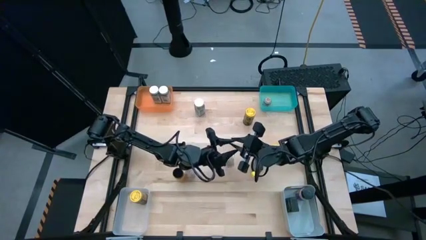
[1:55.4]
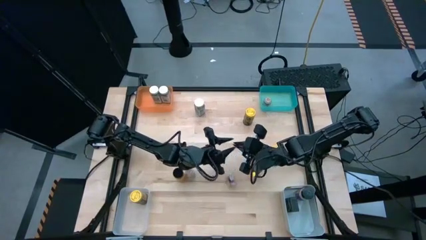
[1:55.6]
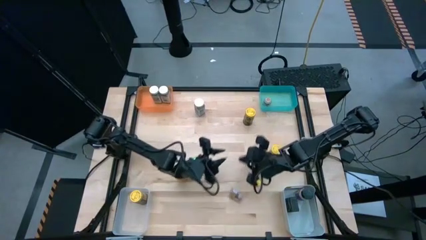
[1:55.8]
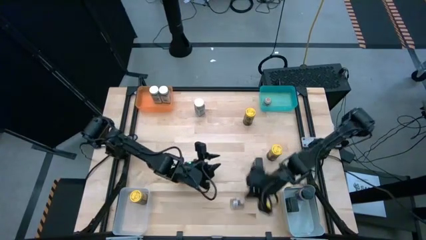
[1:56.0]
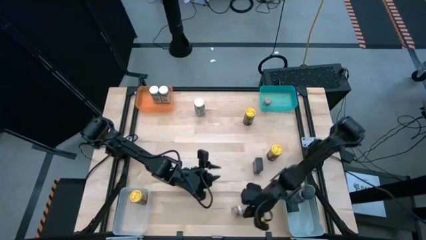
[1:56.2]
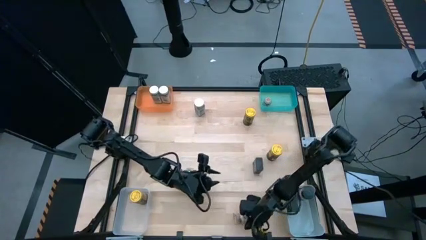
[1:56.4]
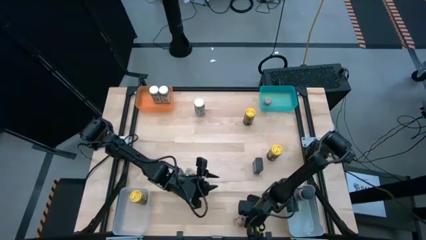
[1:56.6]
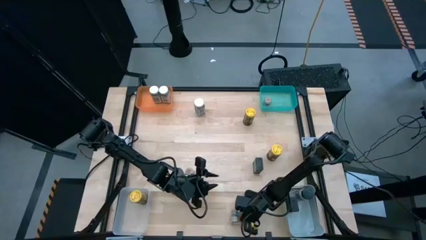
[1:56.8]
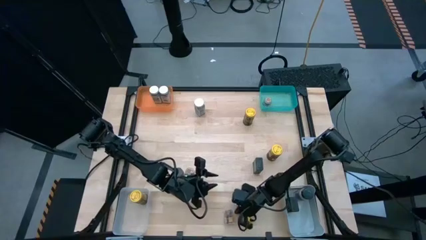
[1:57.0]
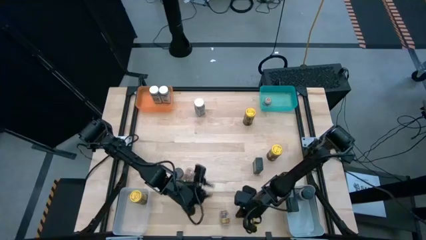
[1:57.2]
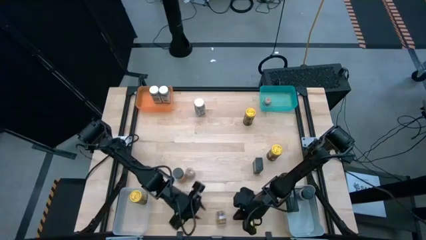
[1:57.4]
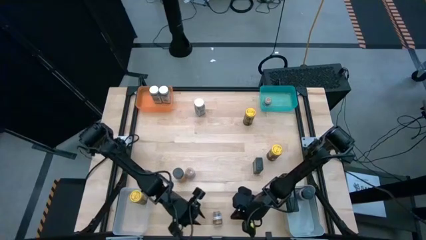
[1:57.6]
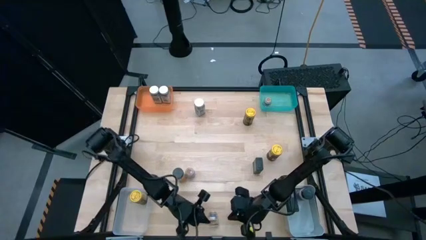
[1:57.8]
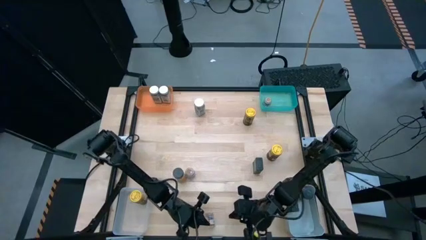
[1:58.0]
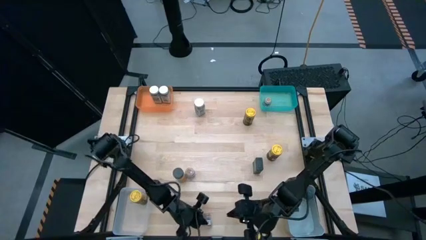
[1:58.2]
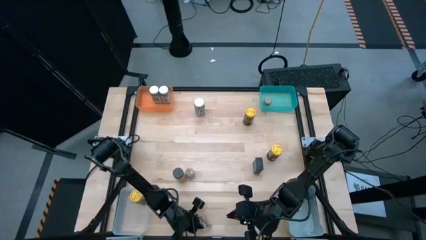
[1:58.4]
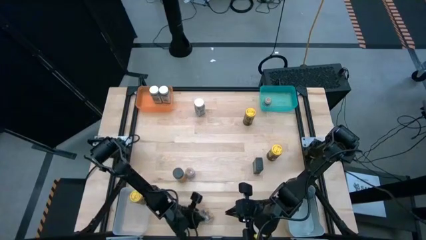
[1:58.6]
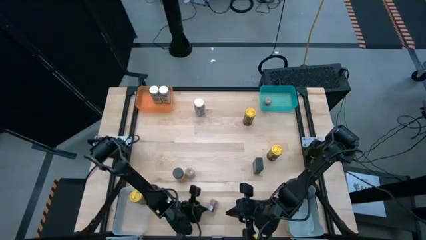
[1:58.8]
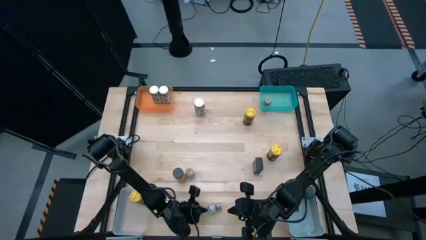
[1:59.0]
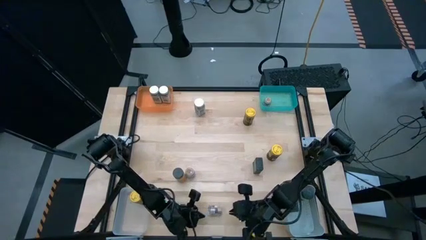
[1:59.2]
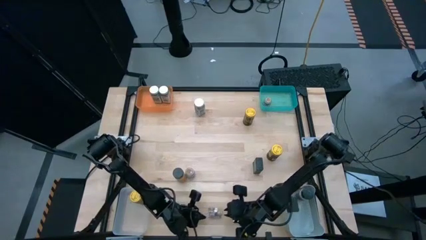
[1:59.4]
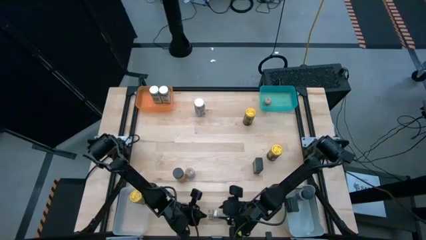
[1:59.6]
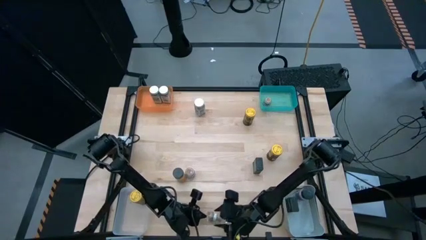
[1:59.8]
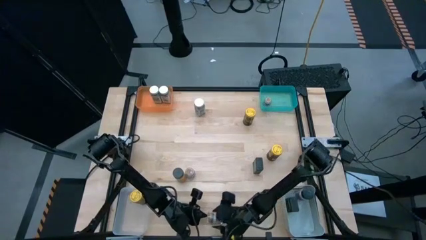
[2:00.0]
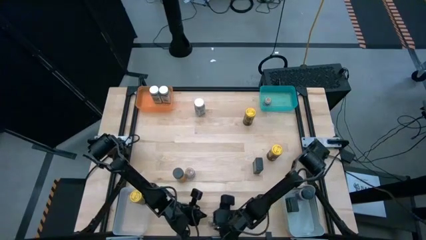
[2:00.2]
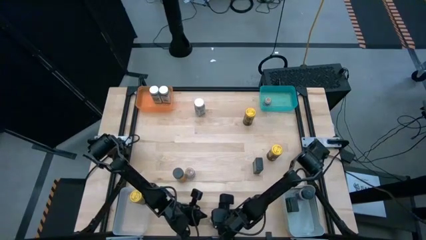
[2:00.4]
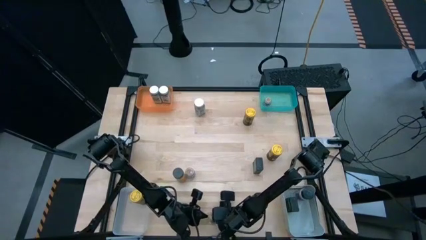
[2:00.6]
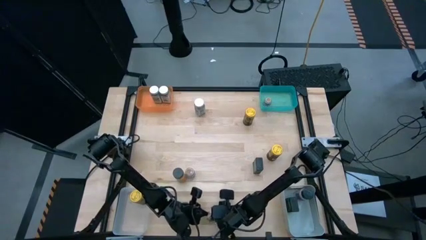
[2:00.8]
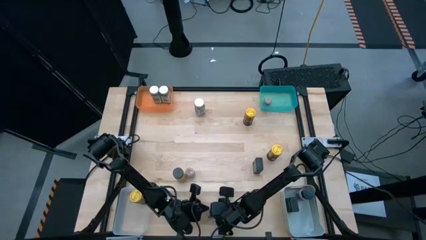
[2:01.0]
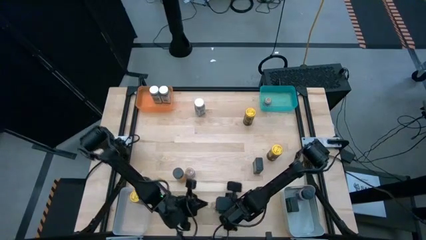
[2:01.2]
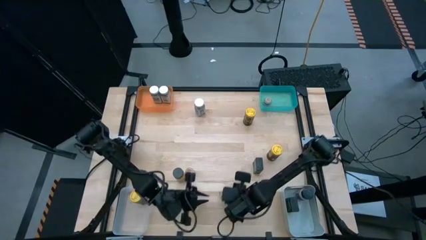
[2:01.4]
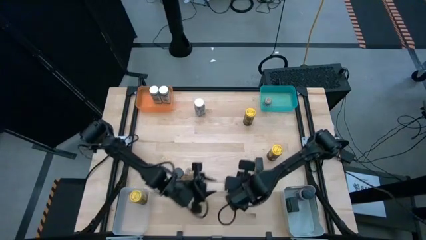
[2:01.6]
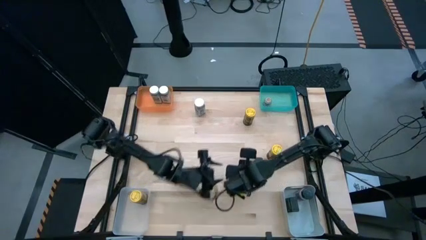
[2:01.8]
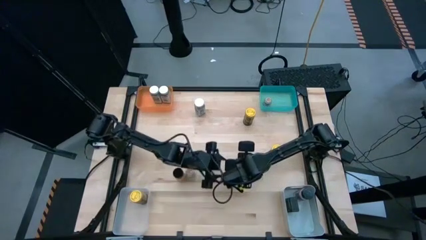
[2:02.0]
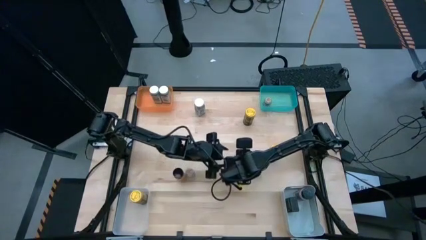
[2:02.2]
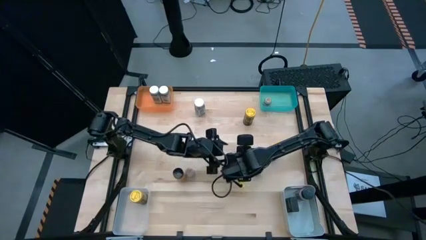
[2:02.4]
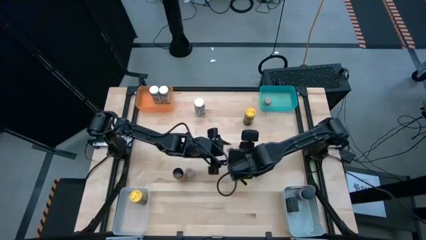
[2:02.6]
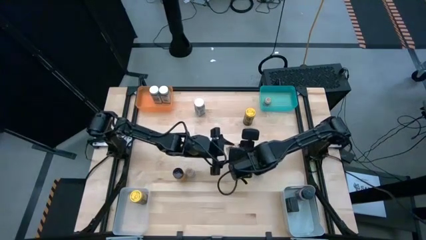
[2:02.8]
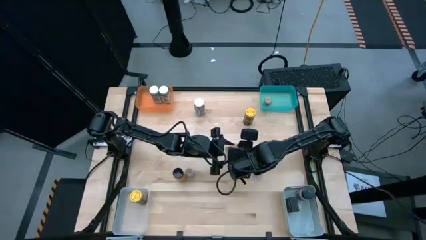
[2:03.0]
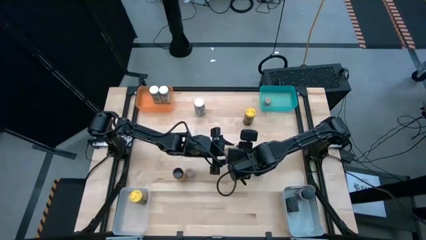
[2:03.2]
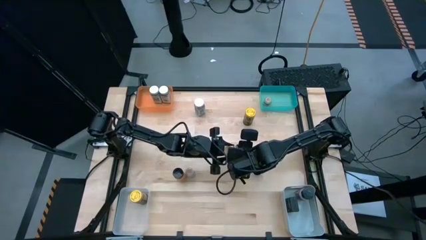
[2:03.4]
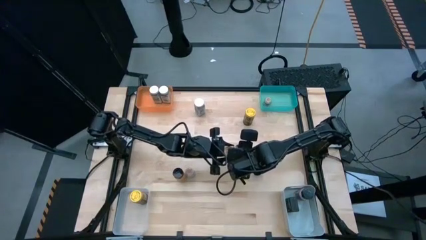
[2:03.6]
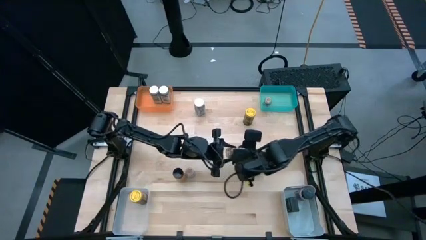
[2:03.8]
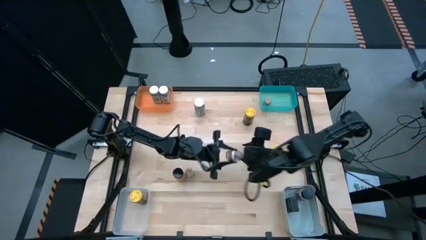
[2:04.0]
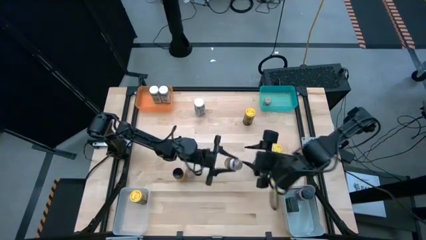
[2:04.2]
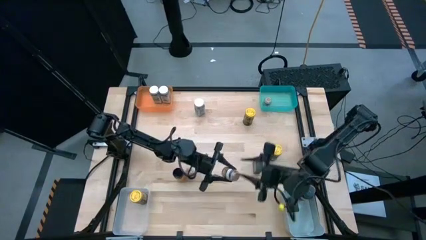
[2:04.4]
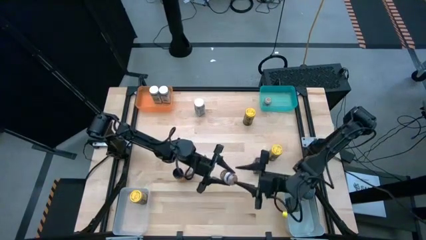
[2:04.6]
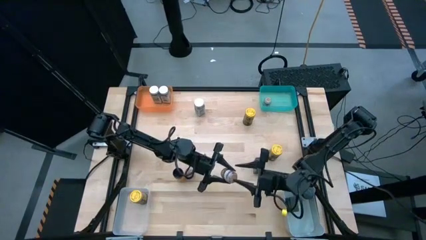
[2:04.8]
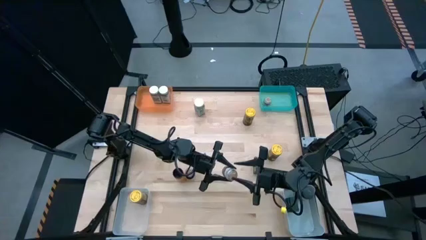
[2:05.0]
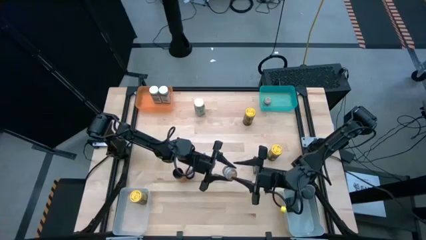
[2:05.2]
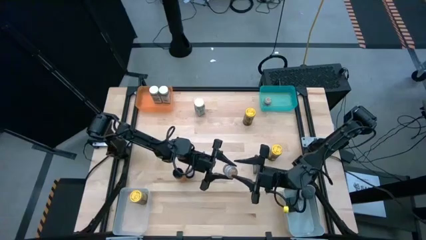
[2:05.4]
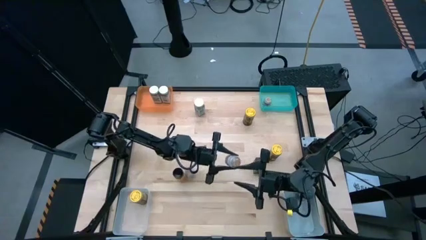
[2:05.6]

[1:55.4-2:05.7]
Task: Sort spices by type
Put the brown seasoning bottle into the blue bin

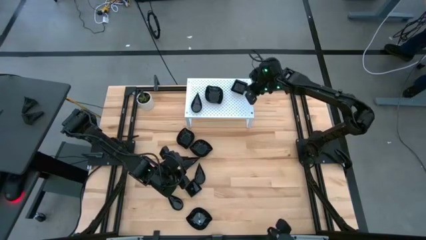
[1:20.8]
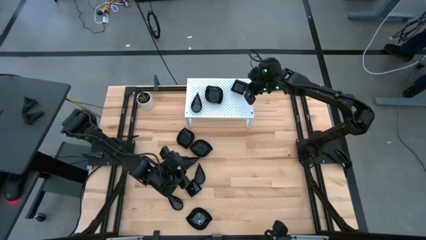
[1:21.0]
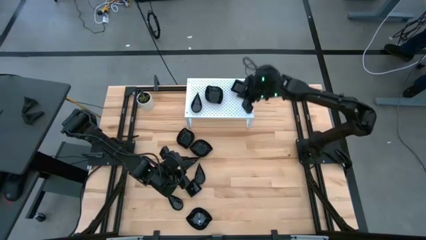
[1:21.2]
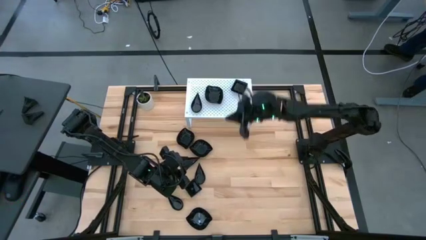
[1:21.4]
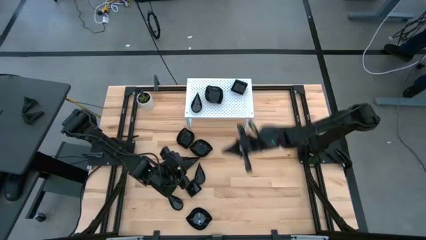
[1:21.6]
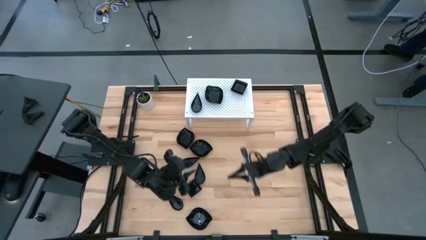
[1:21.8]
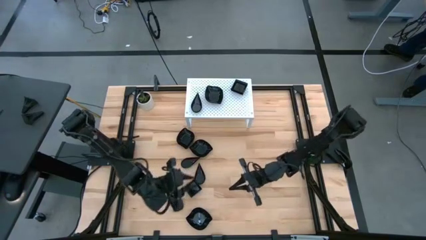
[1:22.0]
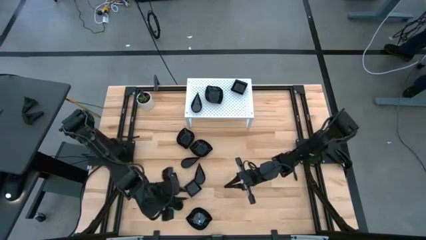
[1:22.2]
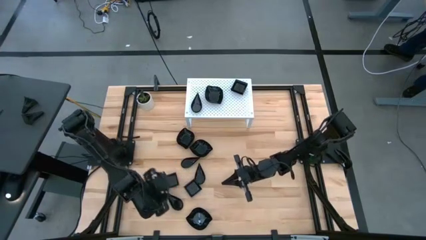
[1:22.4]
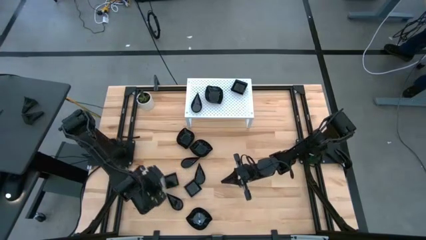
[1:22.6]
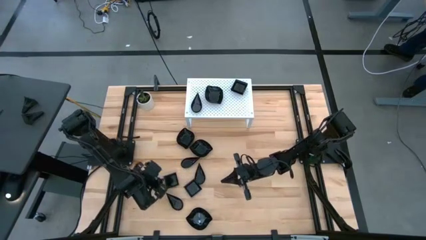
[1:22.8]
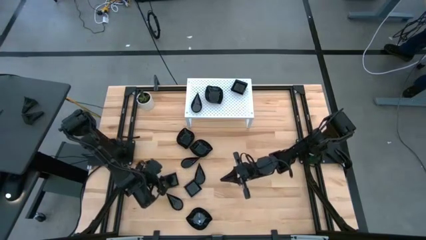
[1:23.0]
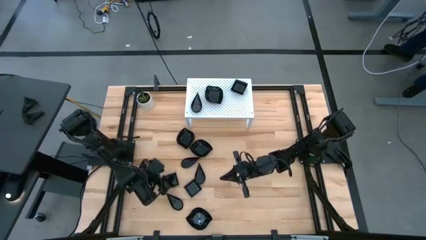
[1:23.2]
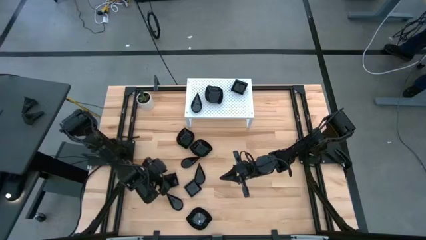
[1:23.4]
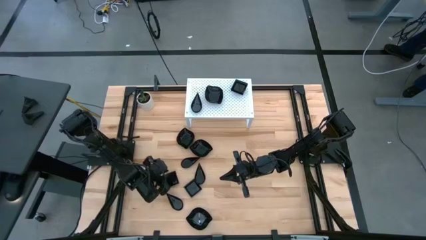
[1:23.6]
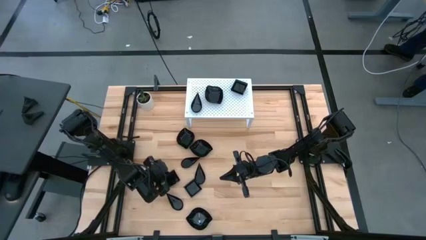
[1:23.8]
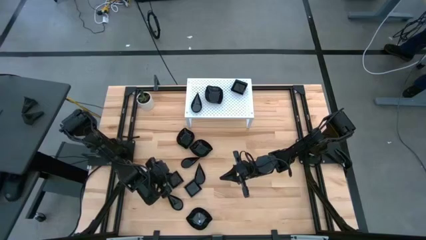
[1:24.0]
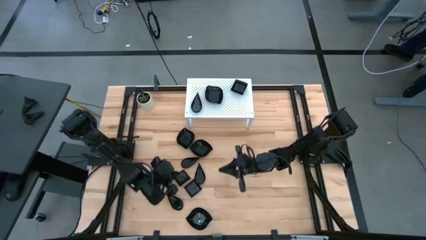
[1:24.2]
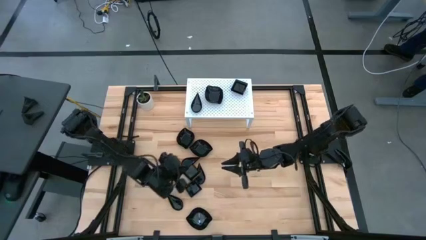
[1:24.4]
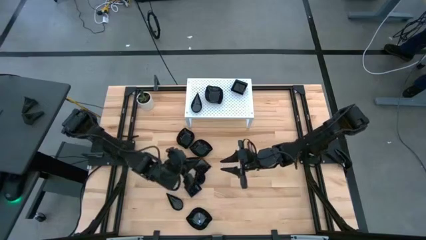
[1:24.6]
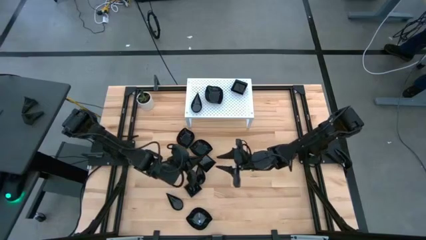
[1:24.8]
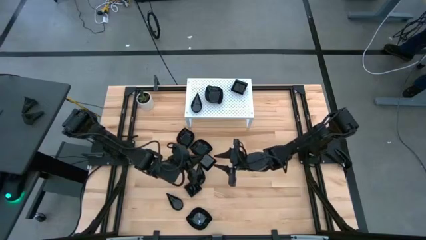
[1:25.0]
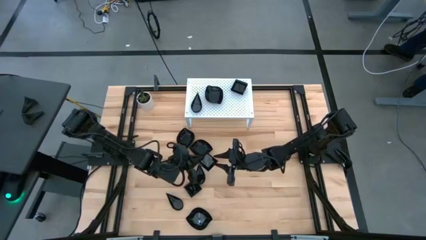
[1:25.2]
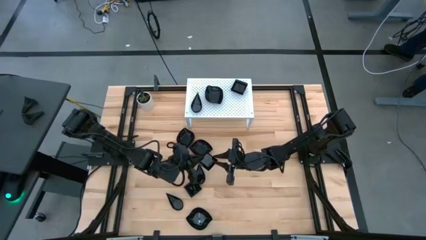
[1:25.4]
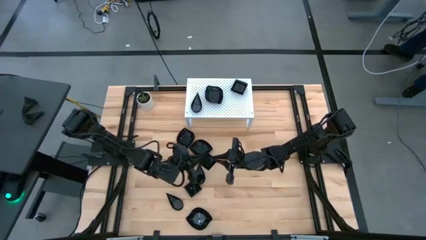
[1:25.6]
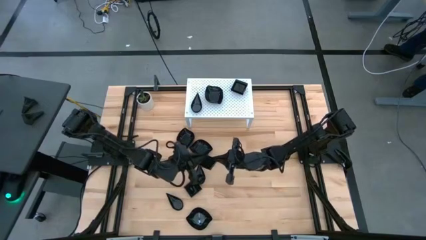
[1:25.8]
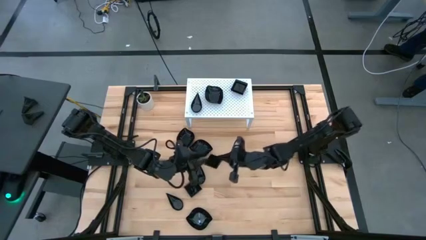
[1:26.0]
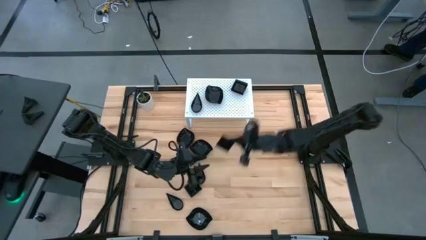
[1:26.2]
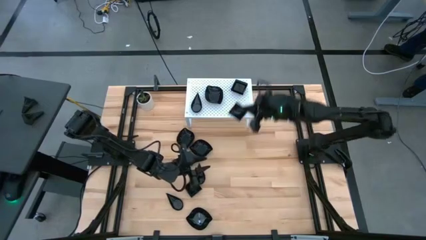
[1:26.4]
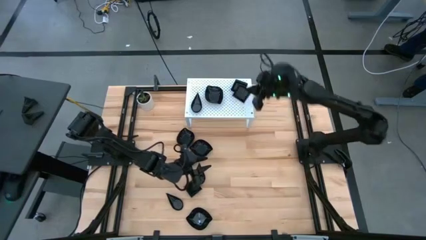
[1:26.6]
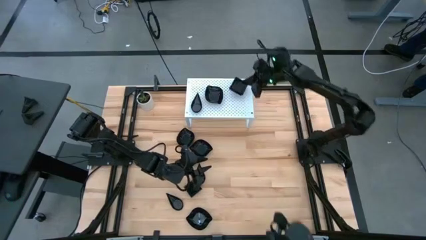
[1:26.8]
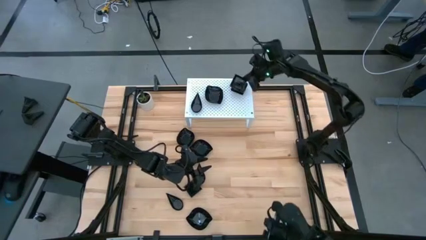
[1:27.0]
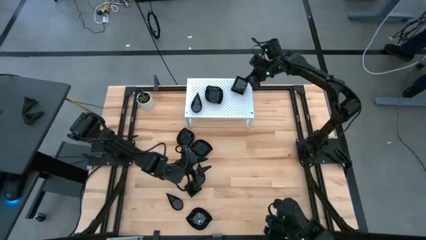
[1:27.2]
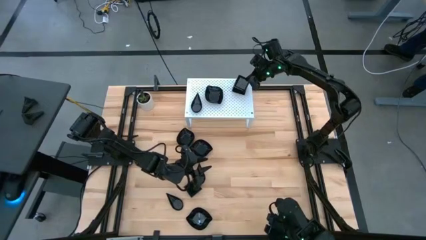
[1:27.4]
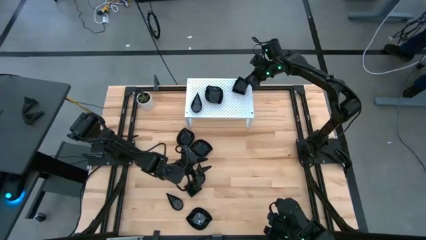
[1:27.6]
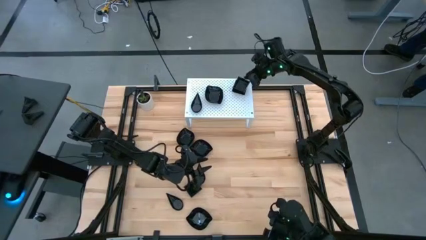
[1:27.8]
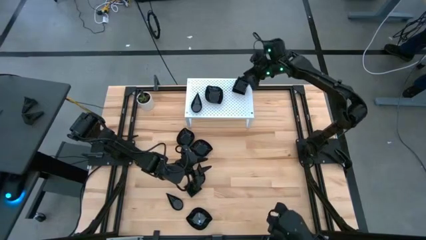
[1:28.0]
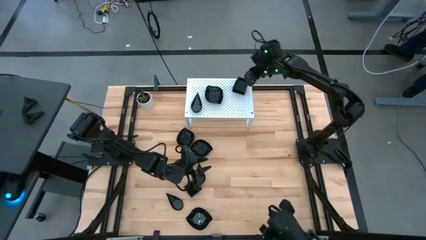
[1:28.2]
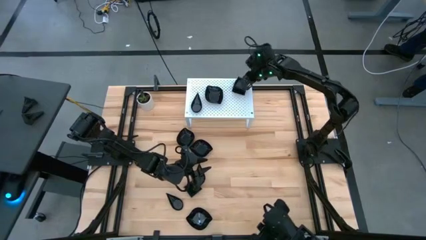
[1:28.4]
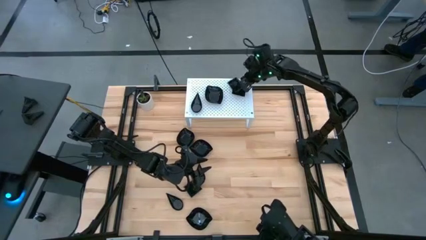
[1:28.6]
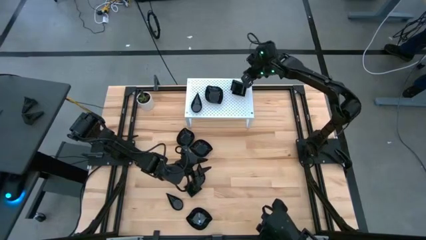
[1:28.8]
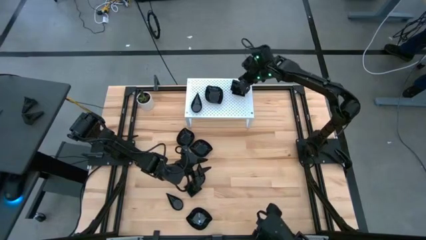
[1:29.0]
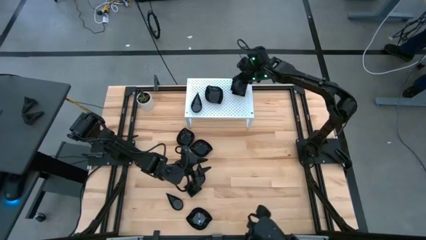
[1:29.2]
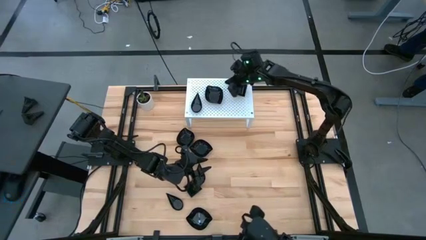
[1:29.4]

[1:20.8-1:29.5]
Task: Pick & Place Mini shaped plates
Stack the black square plate on top of the other black square plate on the shelf
